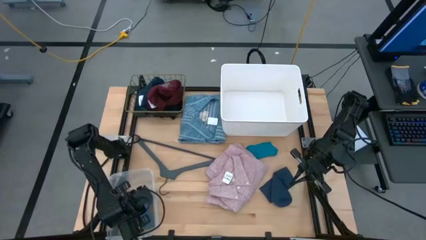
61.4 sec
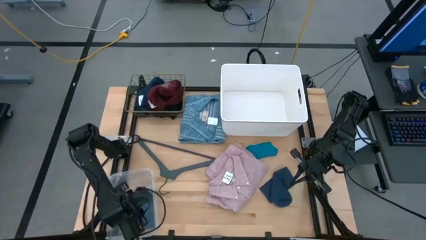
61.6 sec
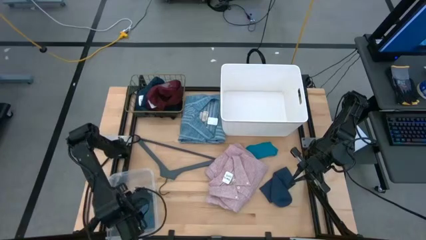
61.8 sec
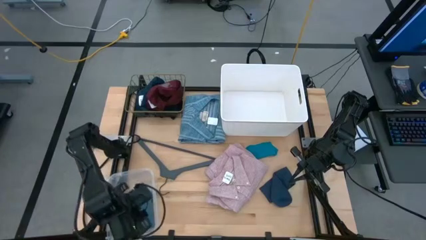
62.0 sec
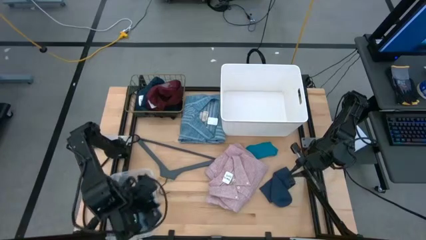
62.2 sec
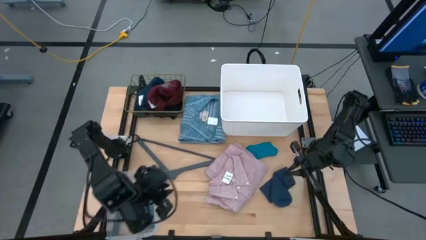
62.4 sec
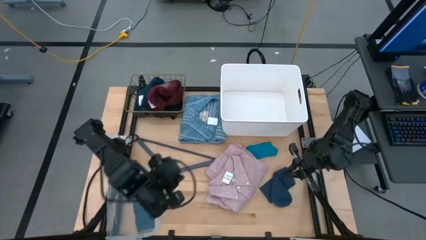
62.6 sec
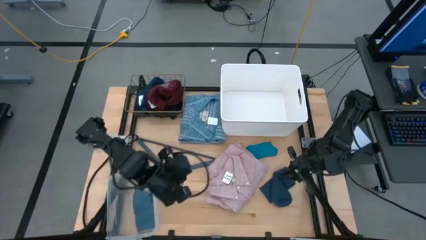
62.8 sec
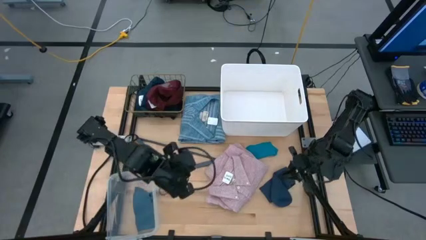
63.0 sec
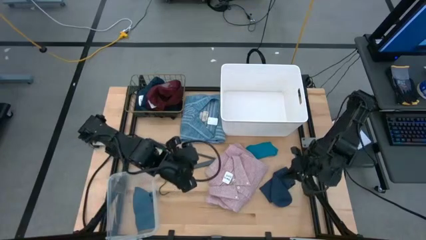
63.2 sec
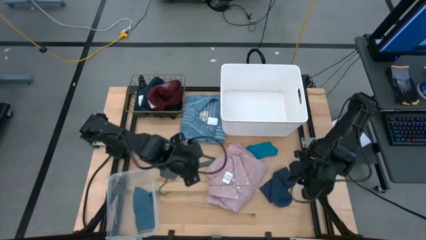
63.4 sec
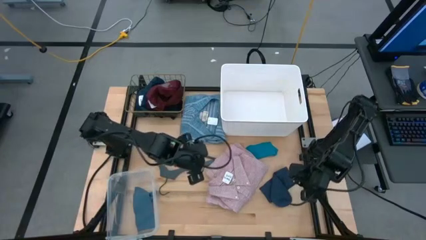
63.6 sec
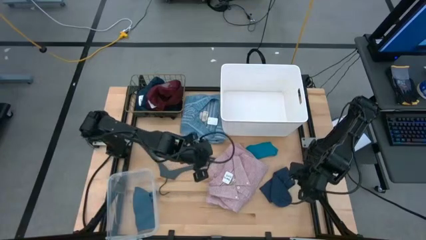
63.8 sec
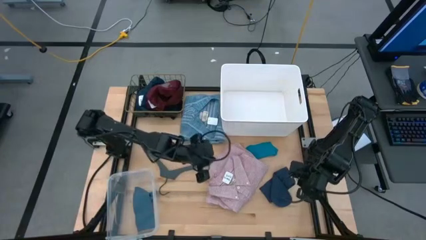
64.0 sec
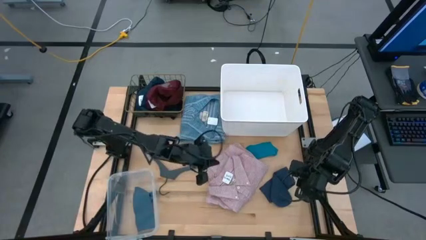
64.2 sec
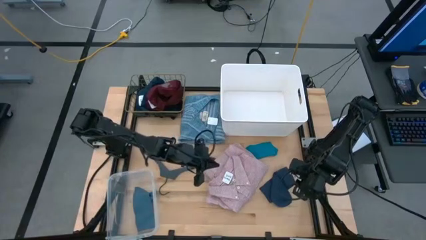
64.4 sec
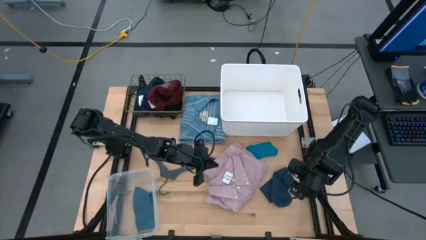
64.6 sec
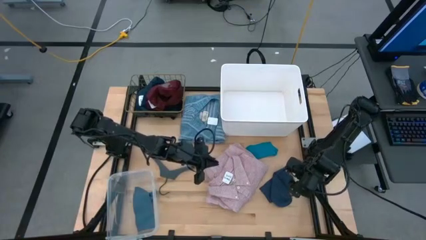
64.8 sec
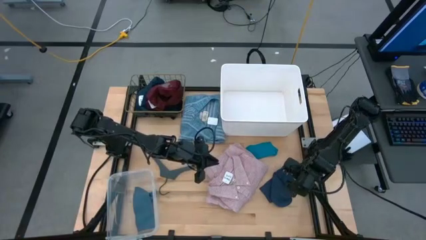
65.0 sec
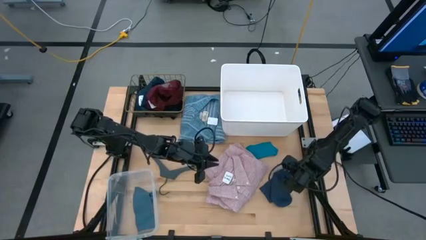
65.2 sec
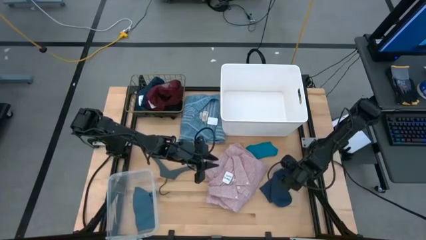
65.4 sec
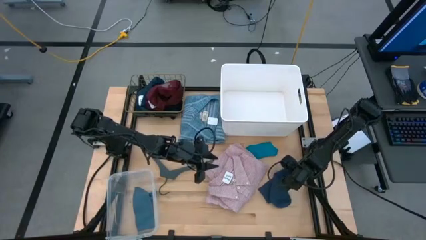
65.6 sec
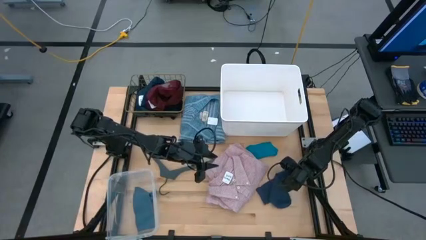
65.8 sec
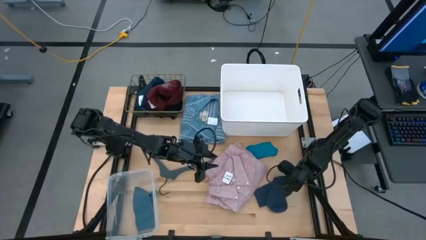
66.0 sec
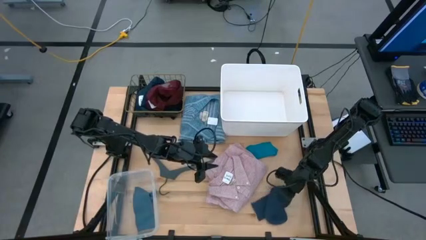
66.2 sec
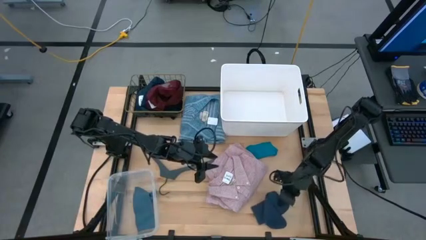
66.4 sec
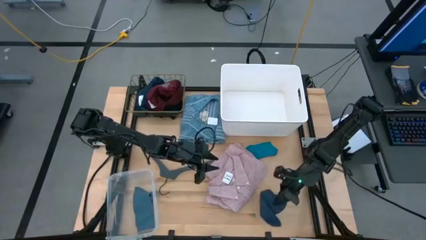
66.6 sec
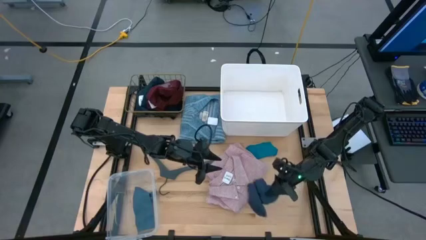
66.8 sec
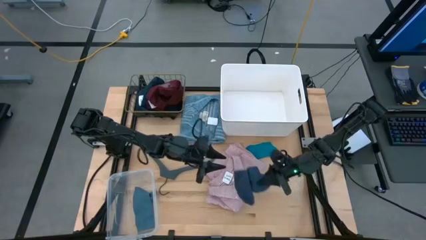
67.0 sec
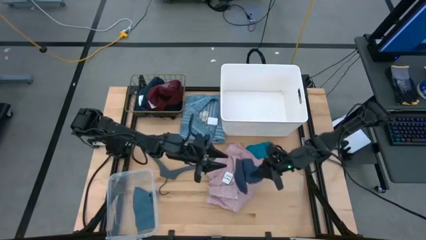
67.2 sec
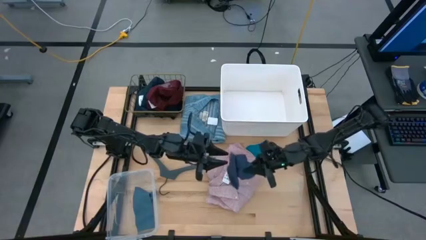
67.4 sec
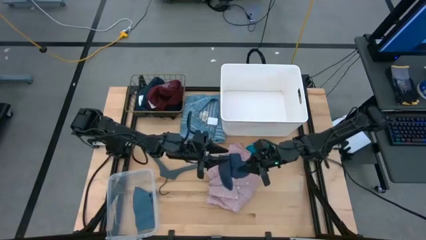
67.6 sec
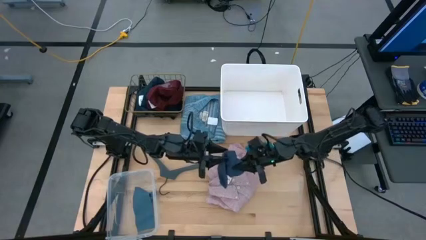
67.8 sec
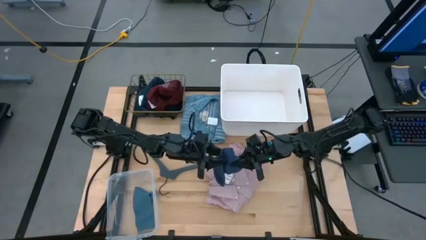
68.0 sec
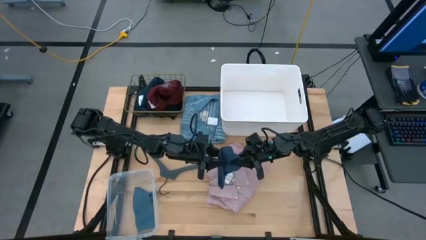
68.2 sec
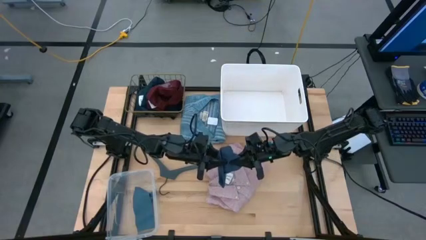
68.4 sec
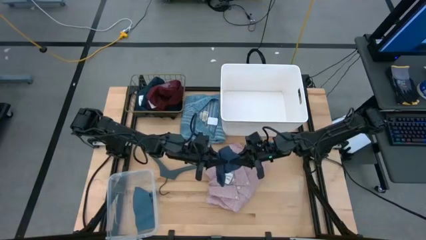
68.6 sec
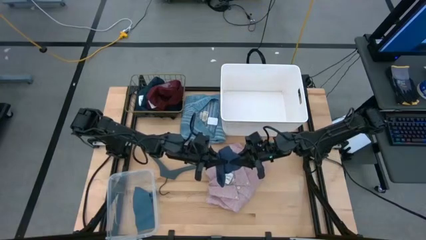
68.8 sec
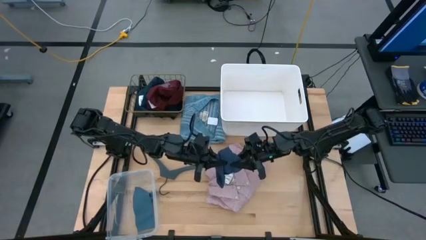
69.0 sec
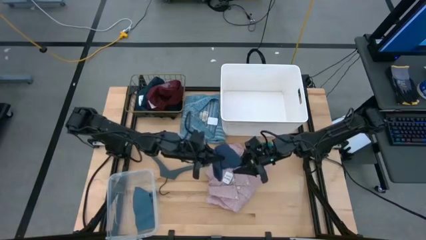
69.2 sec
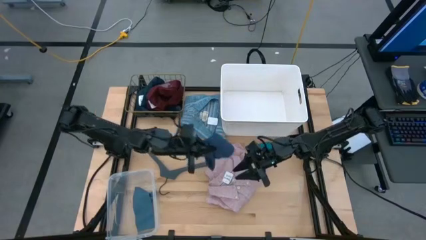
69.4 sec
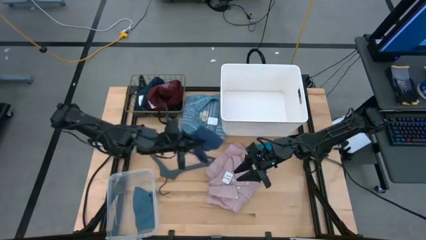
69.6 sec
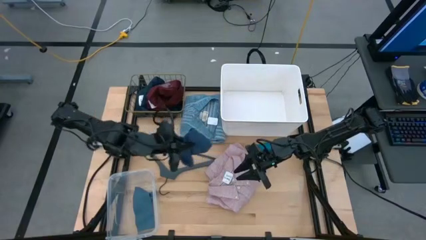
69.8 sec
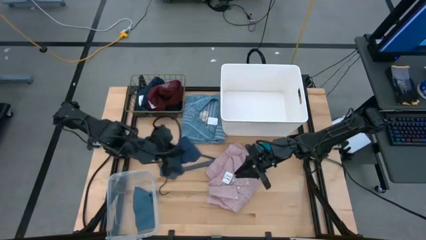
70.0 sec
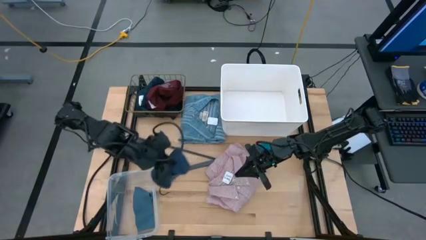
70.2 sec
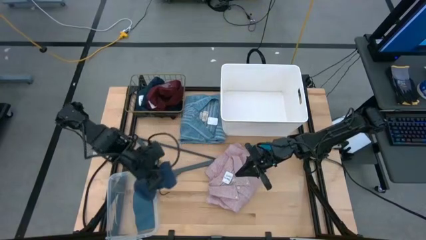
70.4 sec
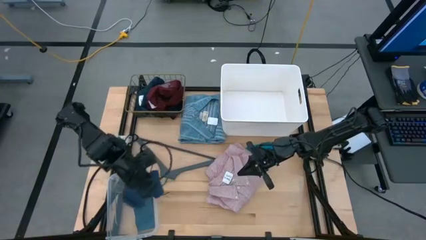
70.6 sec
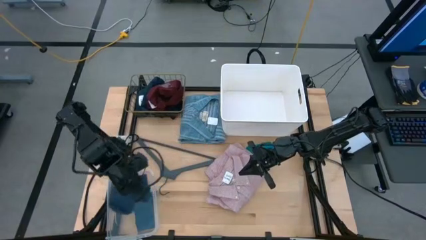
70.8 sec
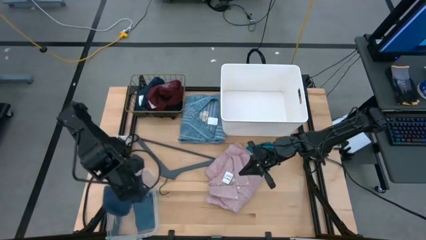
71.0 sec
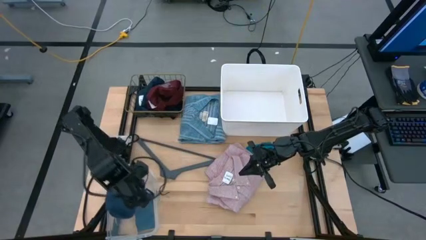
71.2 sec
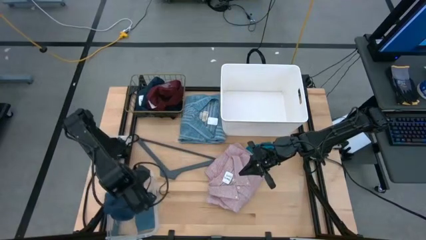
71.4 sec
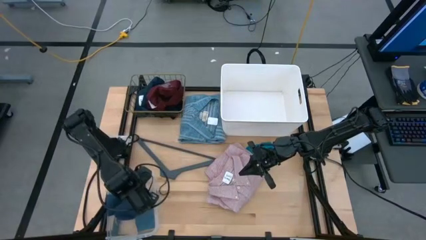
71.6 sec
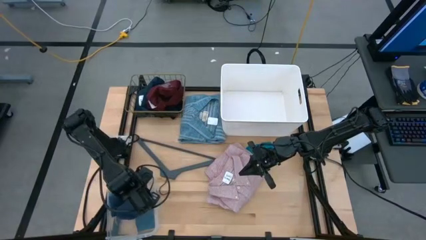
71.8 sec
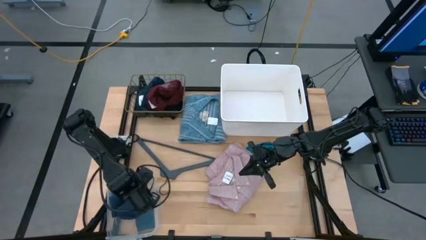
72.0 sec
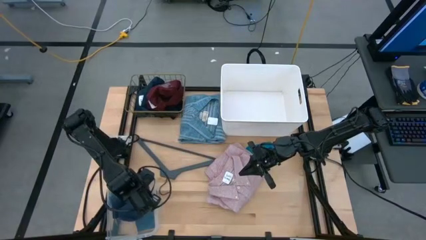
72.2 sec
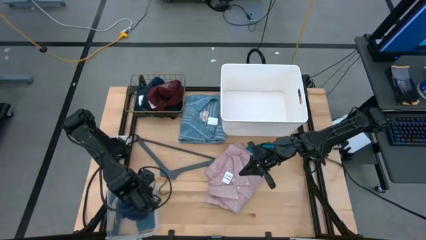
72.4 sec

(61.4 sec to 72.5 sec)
Task: Pick & Place Cloths
Put the dark blue sock into the transparent bin
